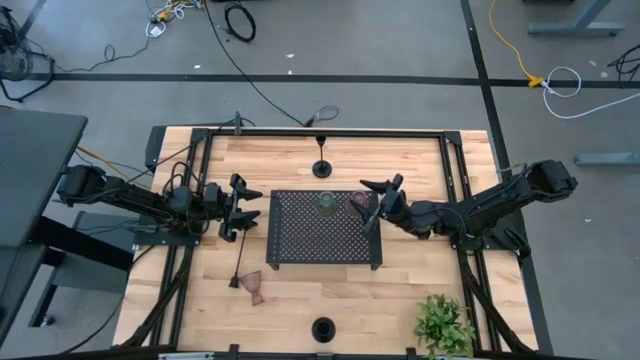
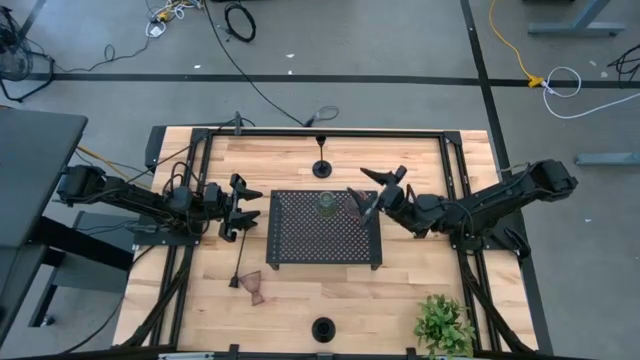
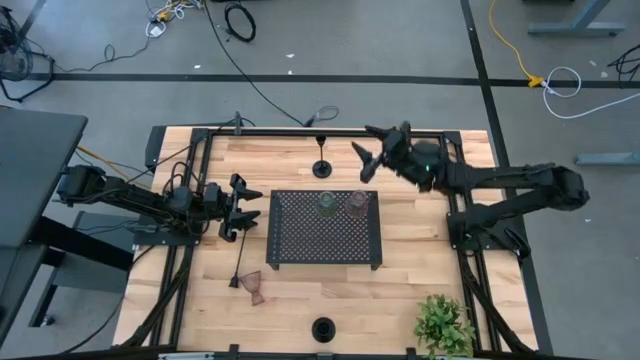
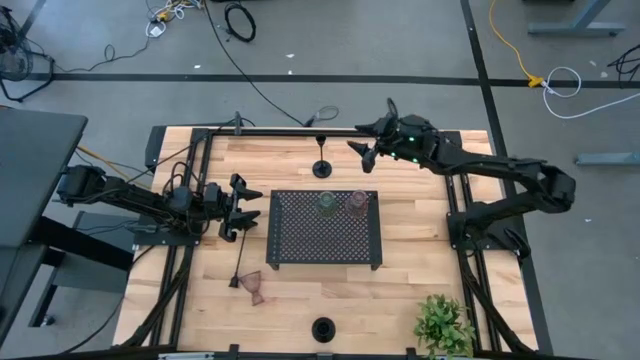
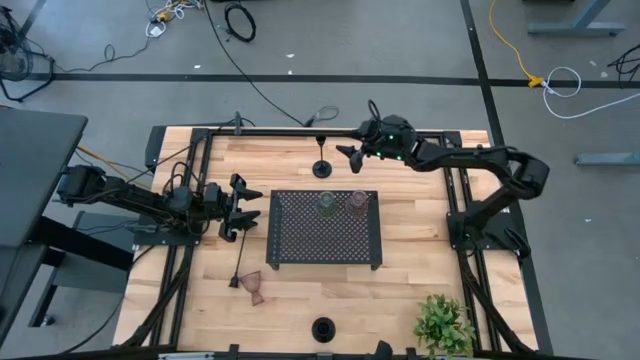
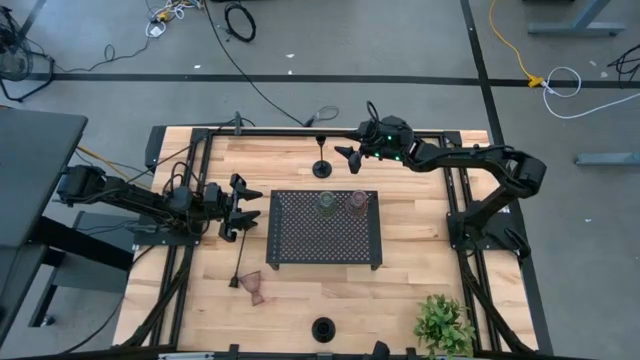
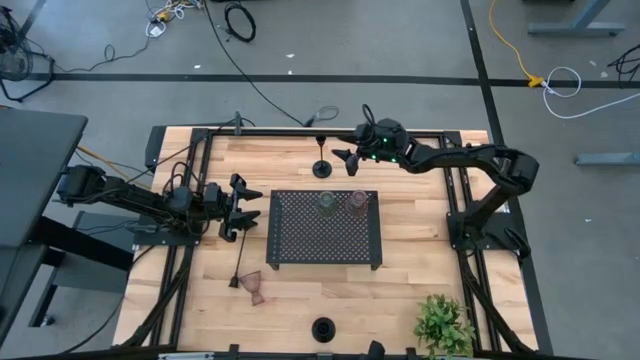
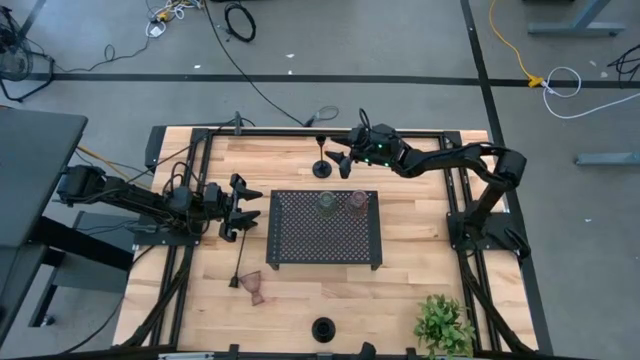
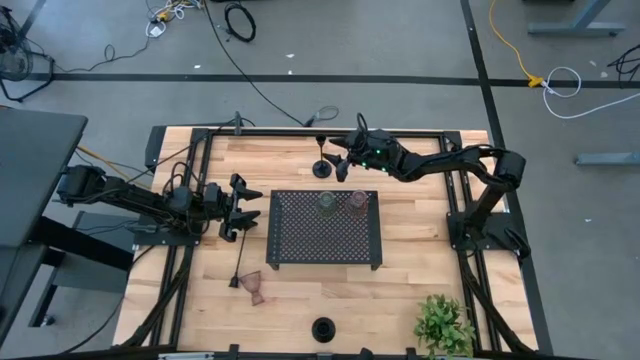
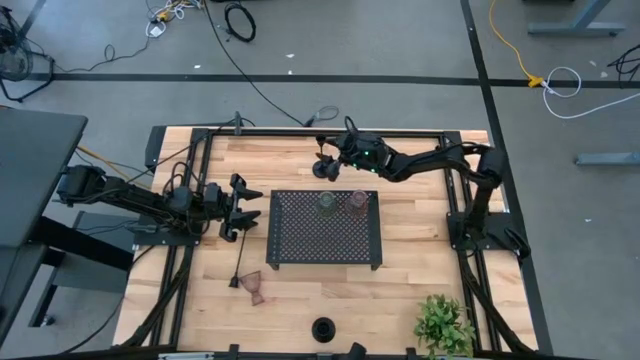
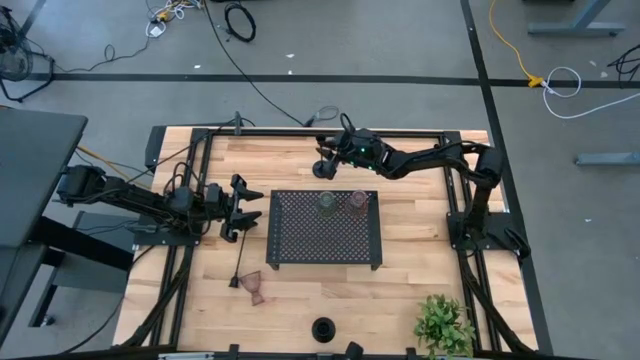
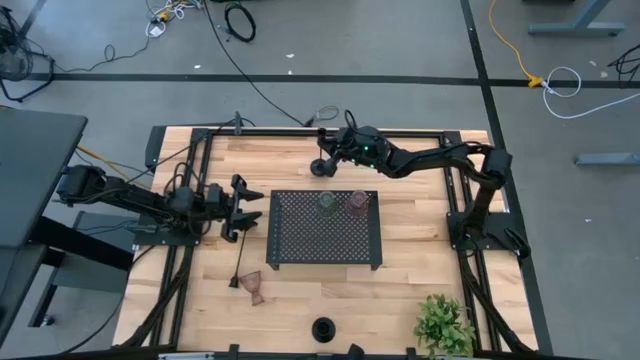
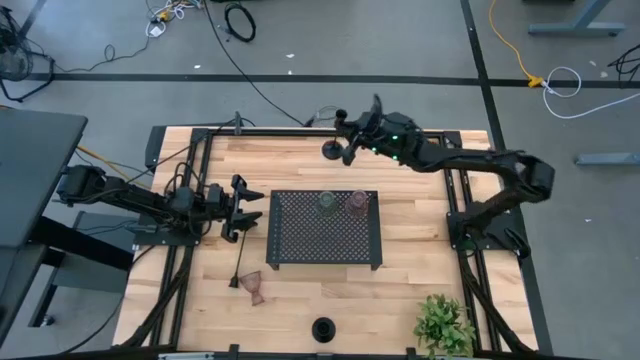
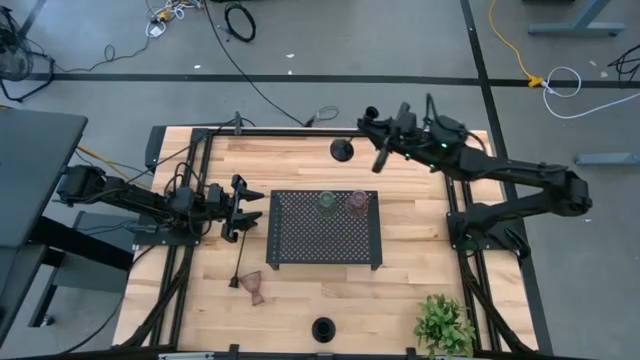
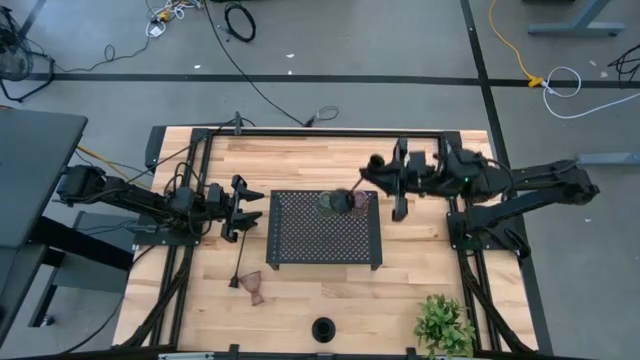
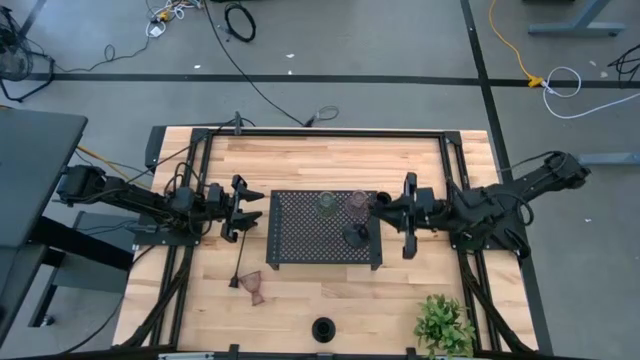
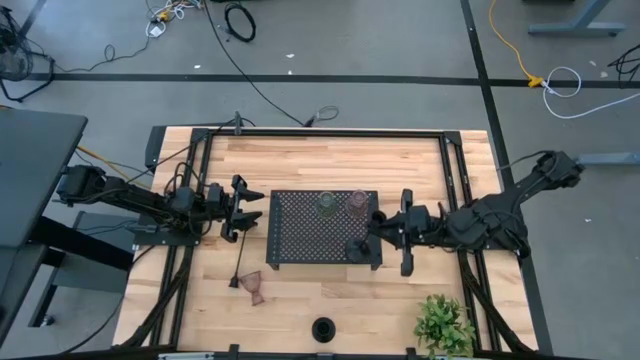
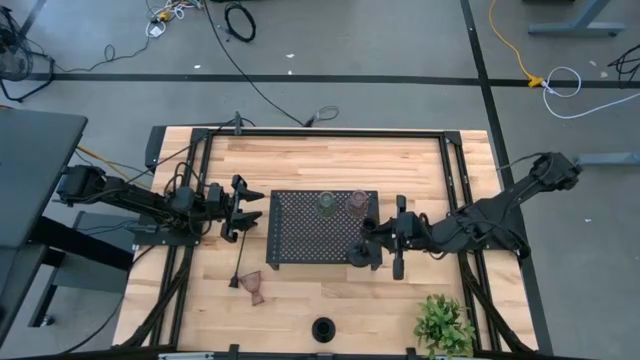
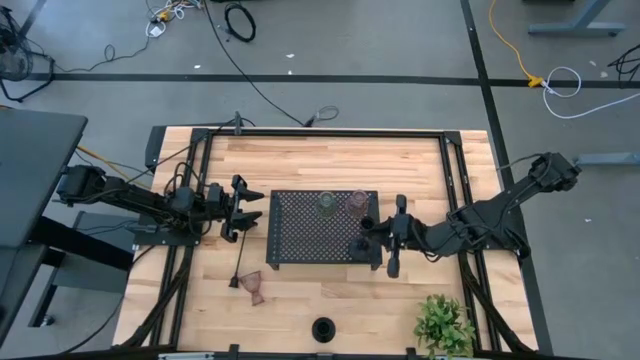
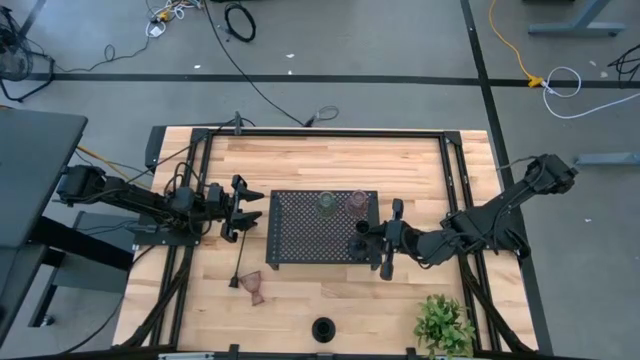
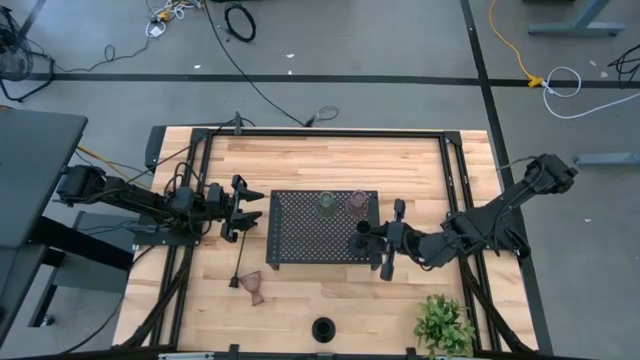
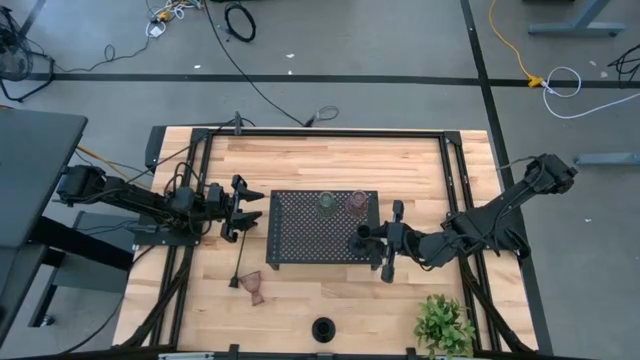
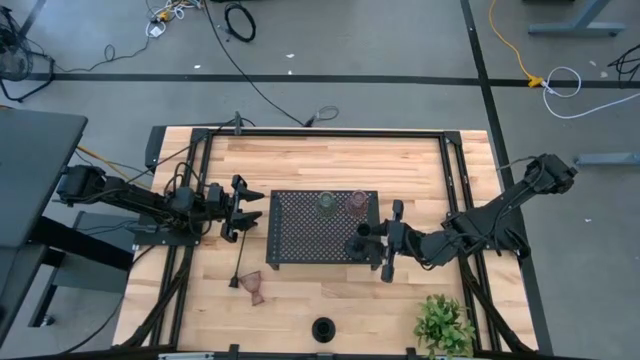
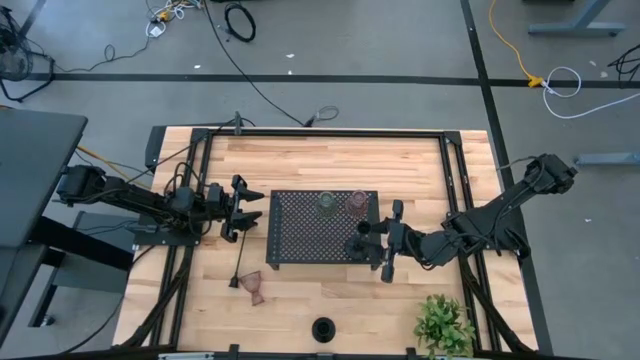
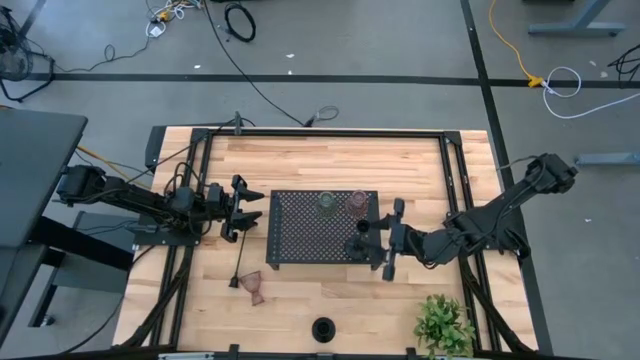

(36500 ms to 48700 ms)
Task: Pick & Place candle stick holders
Put the top black candle holder on the shelf

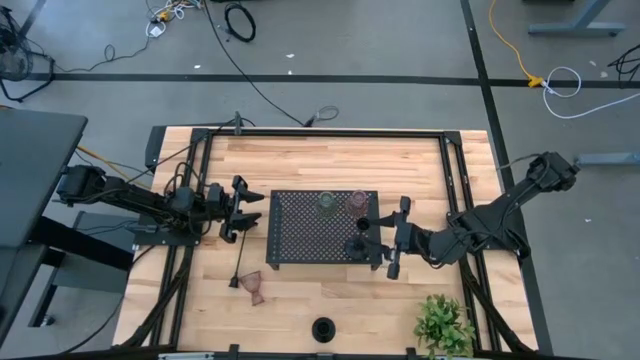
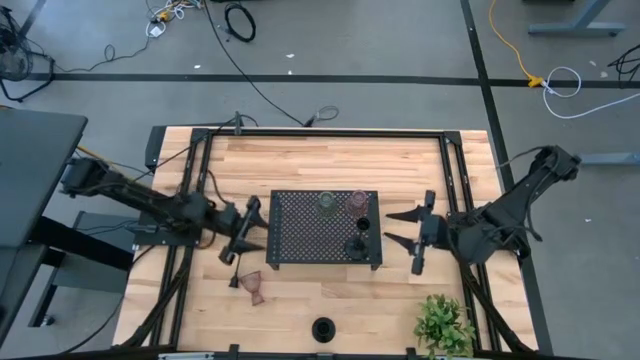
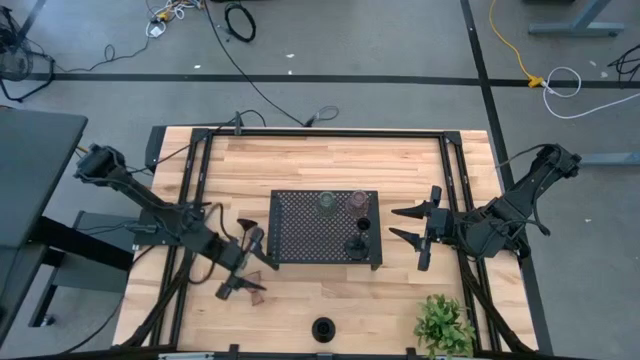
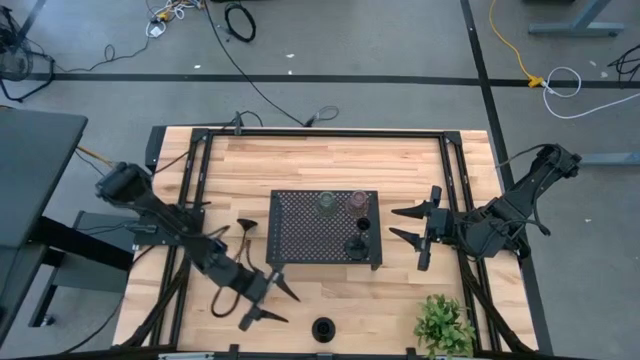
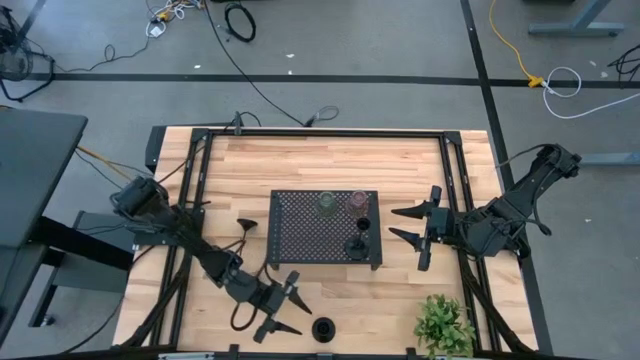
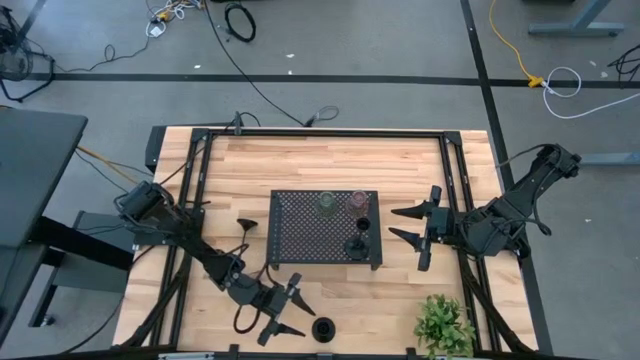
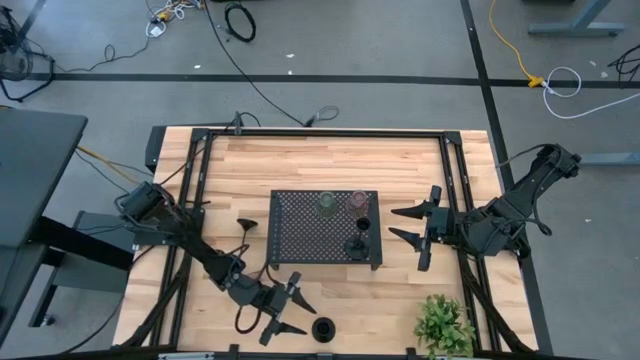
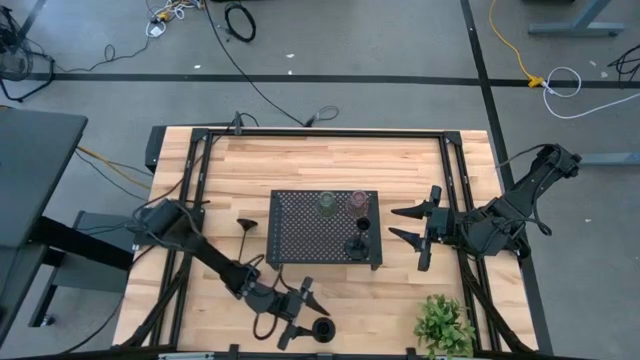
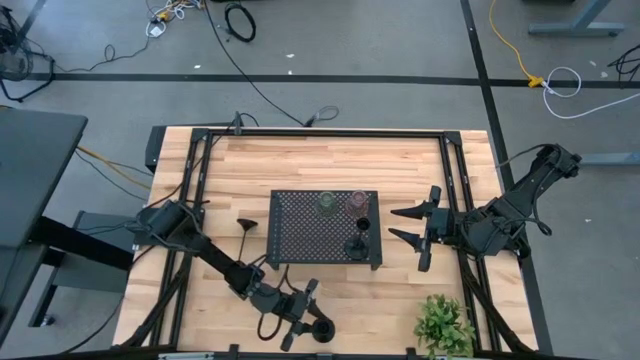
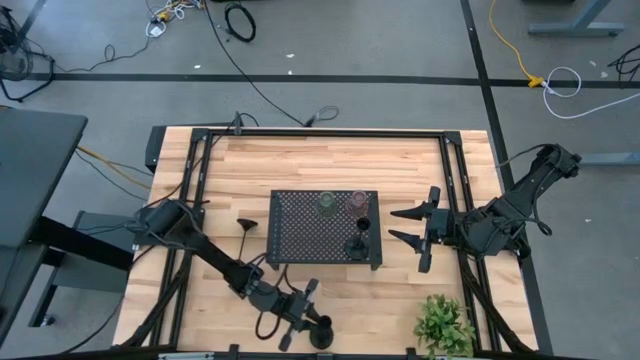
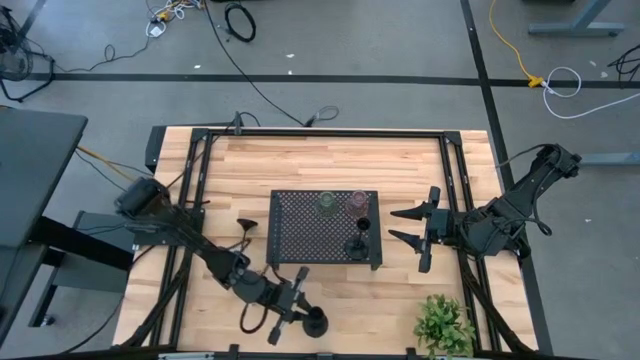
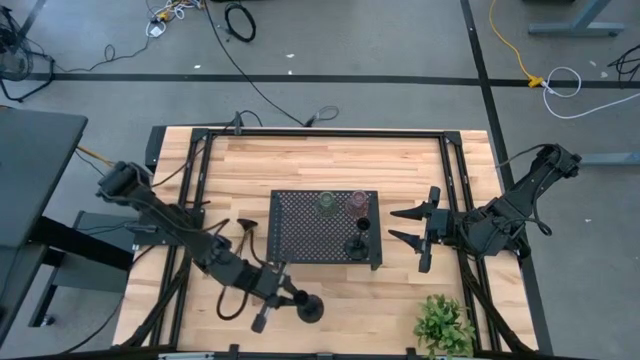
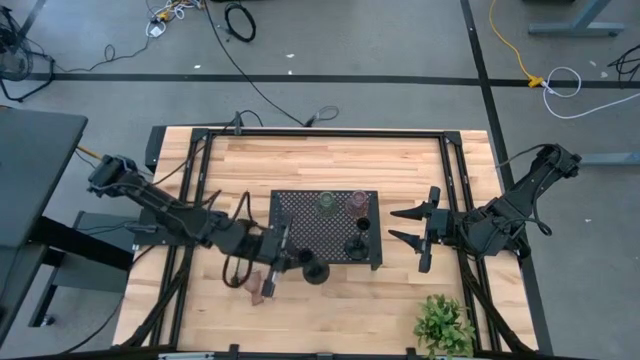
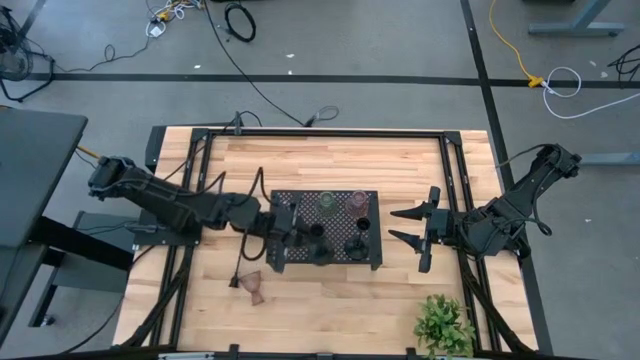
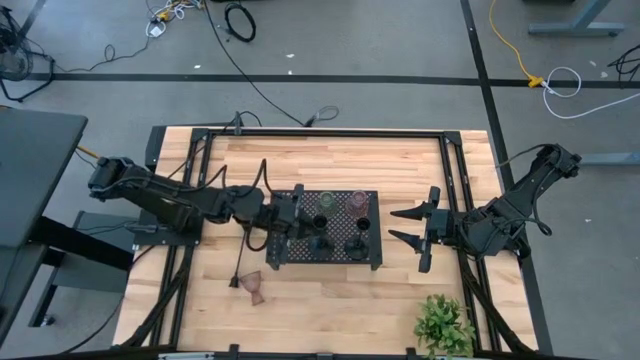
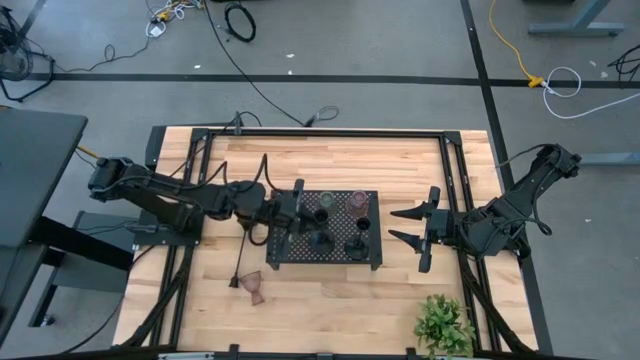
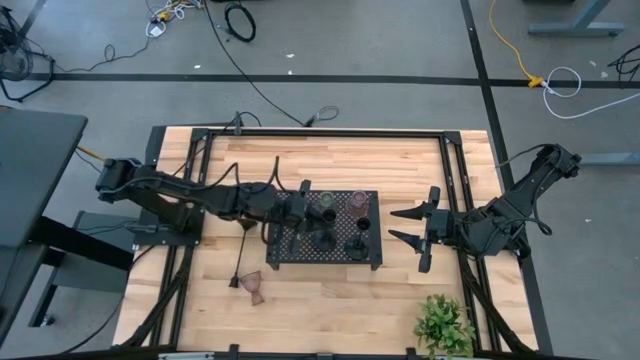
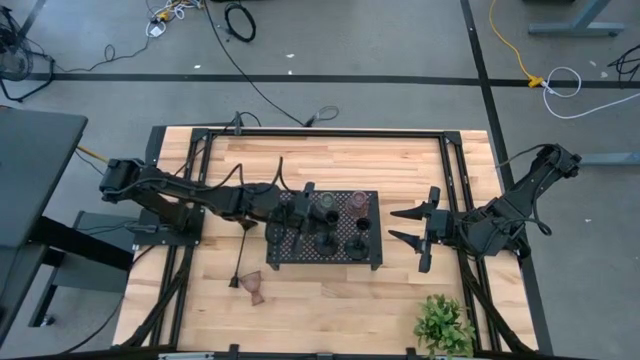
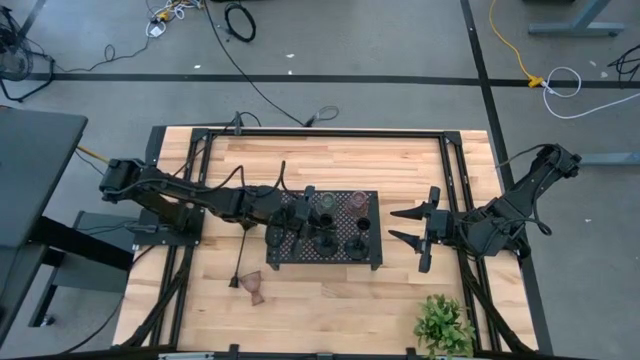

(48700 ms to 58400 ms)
Put the bottom black candle holder on the shelf aligned with the other black candle holder
